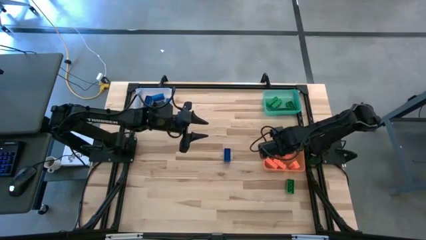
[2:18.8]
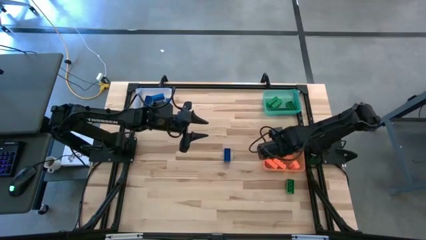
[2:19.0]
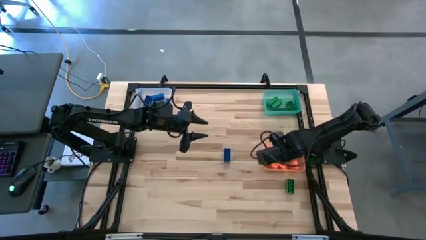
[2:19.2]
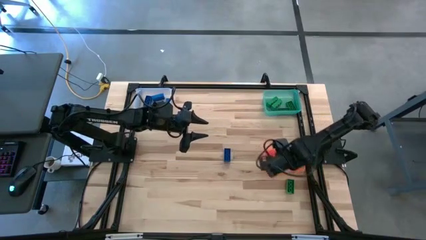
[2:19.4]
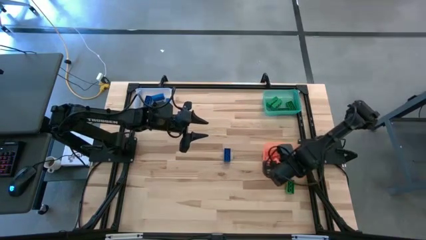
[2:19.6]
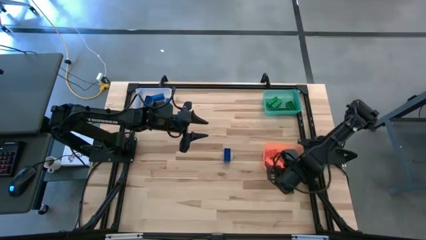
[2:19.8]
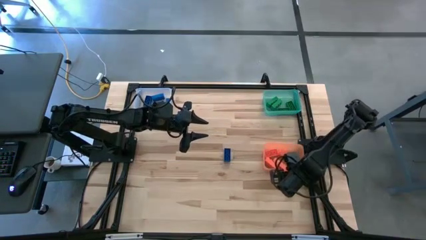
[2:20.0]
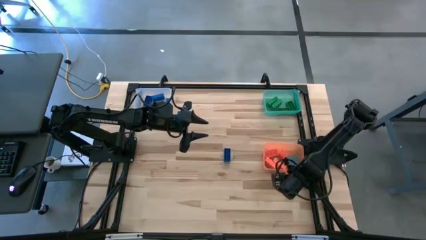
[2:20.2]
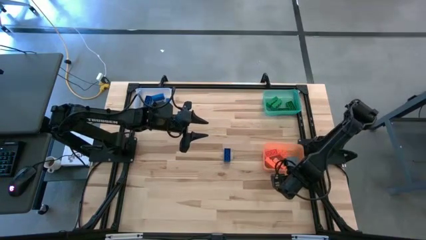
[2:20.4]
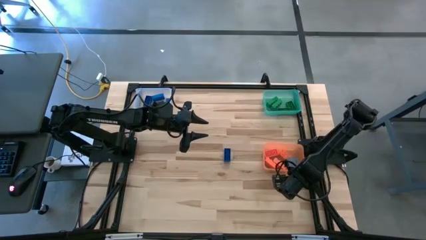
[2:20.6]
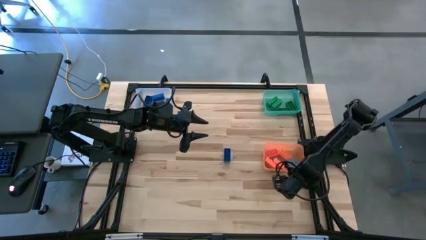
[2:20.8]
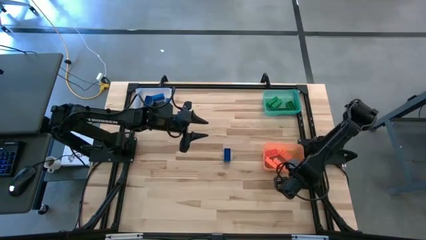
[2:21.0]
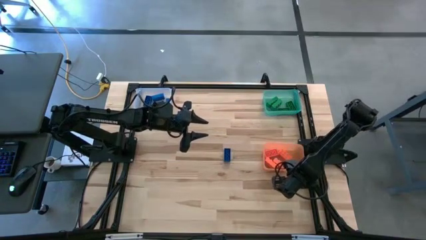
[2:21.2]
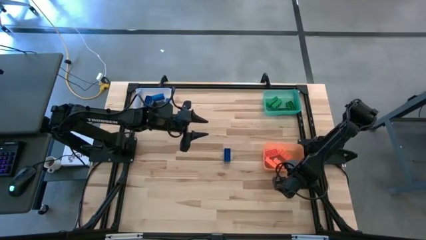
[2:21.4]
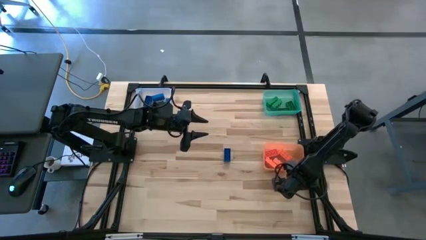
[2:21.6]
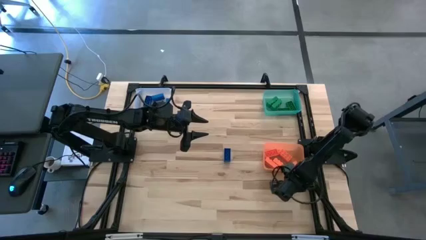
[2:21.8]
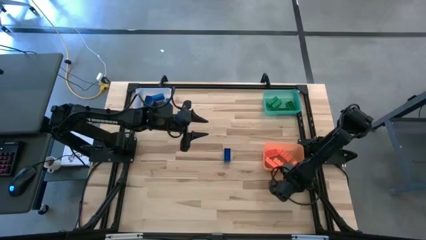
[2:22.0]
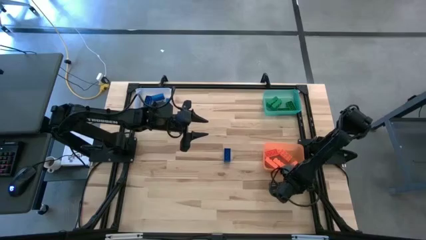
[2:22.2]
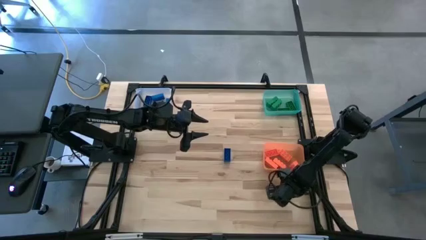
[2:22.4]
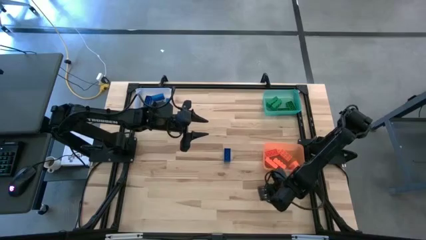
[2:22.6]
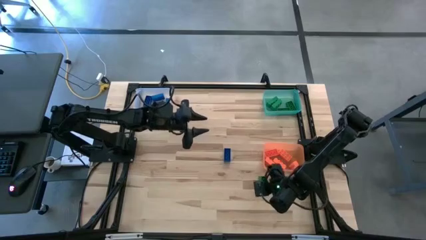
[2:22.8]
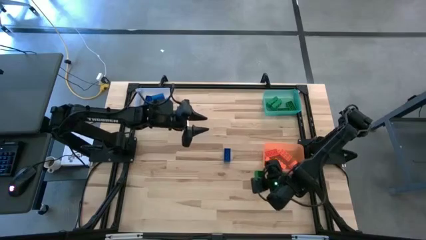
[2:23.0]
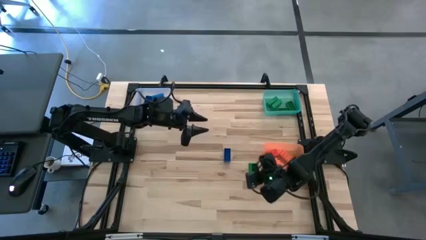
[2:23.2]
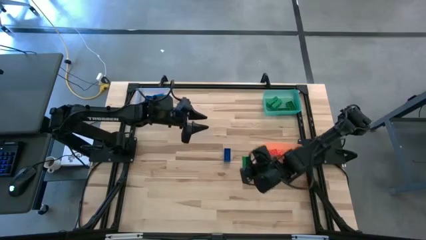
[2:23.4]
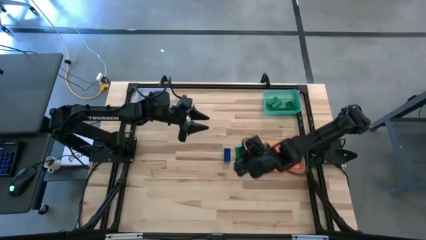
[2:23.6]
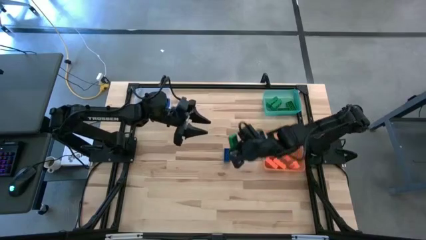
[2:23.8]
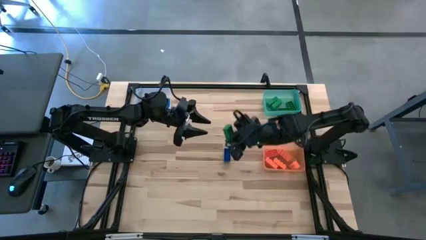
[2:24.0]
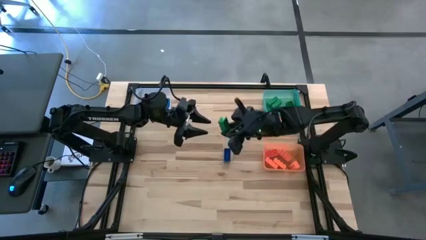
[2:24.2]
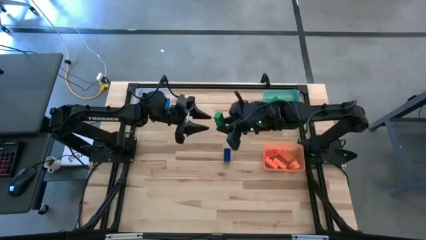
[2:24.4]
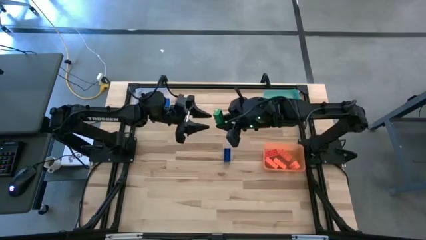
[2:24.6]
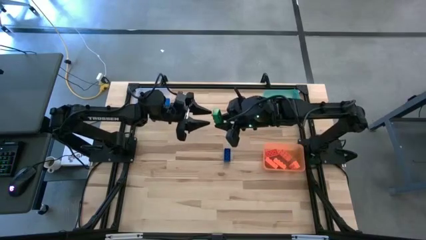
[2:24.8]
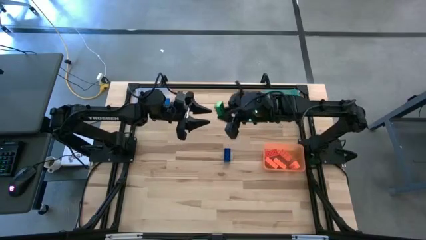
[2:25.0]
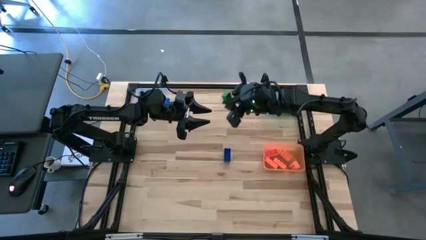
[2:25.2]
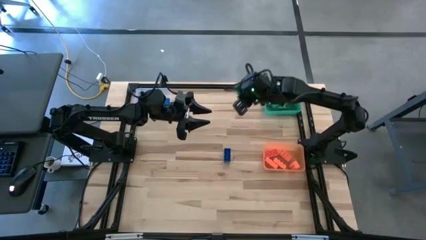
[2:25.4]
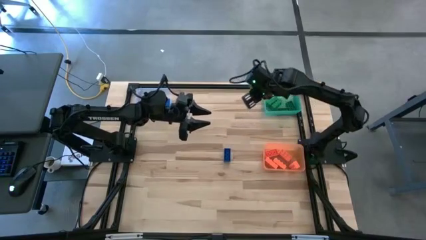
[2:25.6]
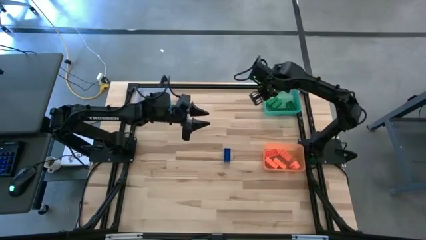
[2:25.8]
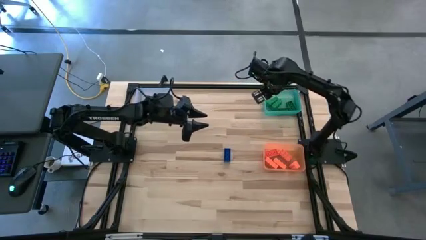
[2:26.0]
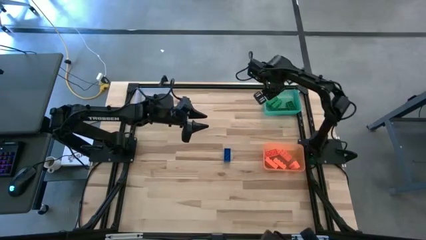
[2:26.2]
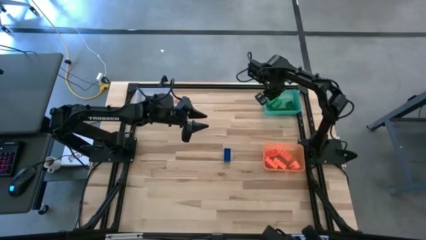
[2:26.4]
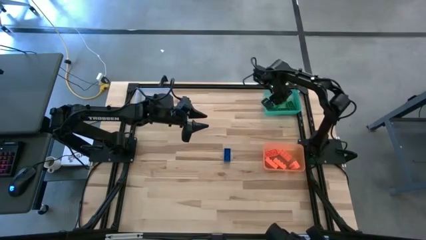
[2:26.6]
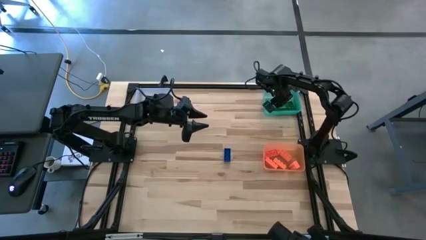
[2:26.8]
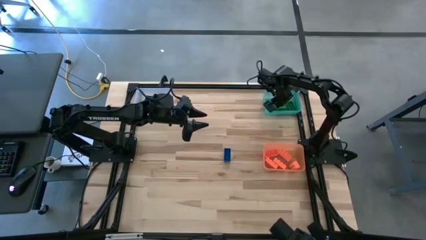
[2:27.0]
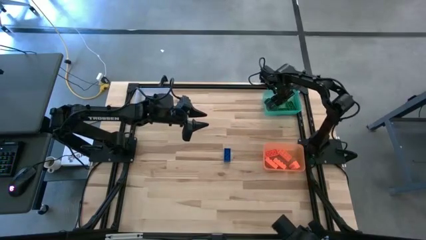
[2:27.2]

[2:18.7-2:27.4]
Task: Sort & place blocks by color
Put the green game piece into the green bin

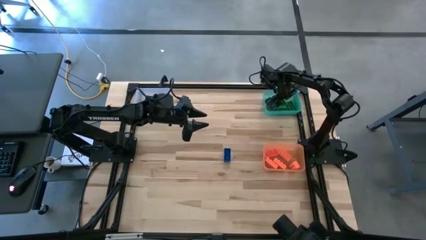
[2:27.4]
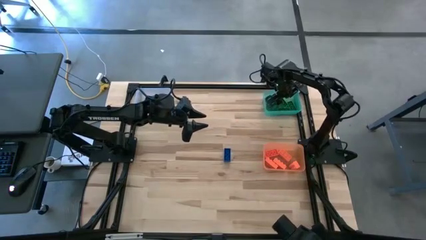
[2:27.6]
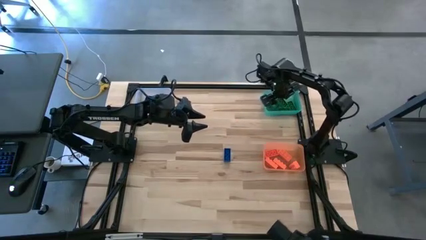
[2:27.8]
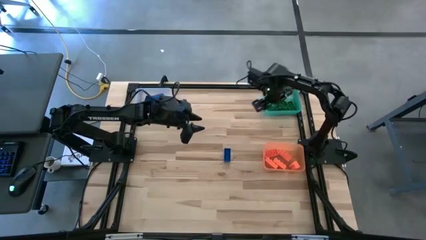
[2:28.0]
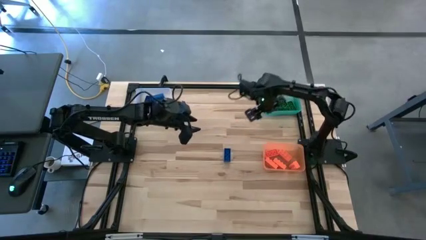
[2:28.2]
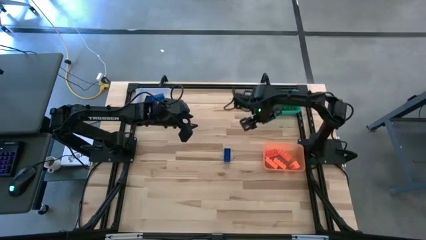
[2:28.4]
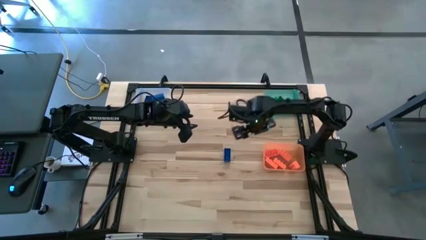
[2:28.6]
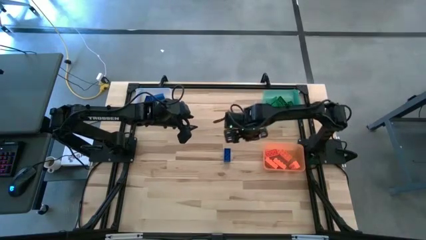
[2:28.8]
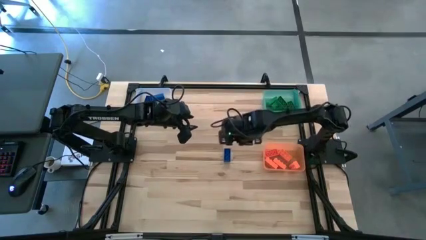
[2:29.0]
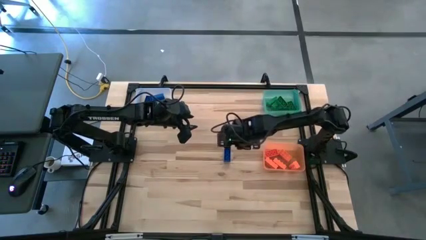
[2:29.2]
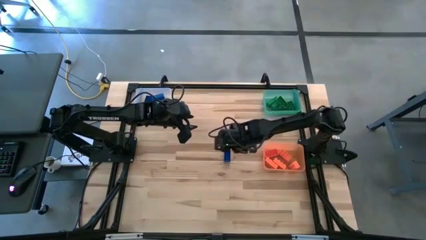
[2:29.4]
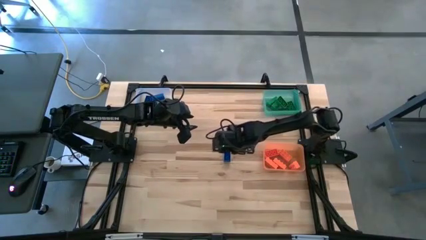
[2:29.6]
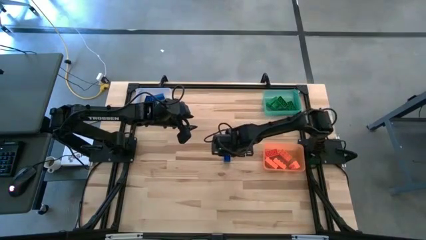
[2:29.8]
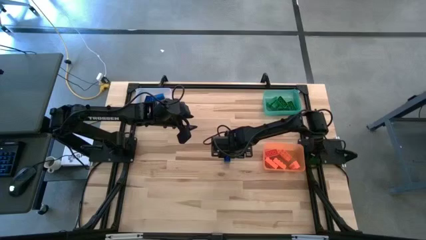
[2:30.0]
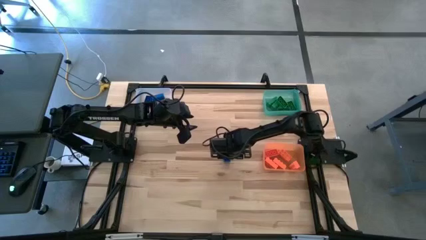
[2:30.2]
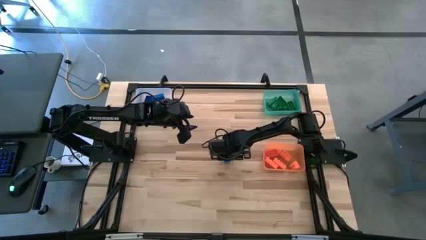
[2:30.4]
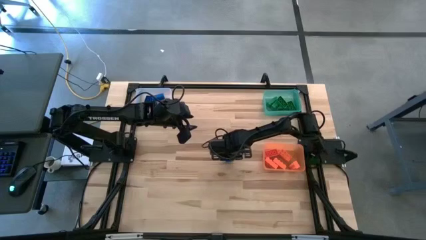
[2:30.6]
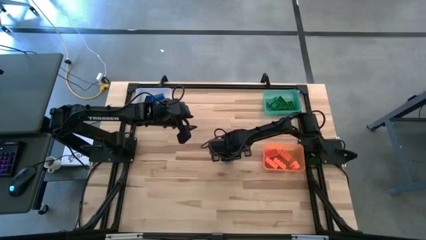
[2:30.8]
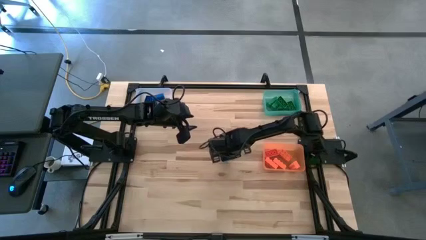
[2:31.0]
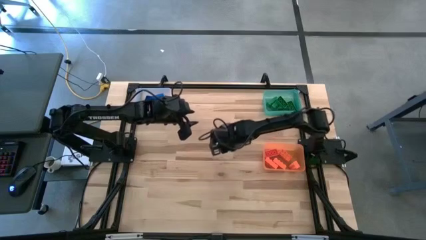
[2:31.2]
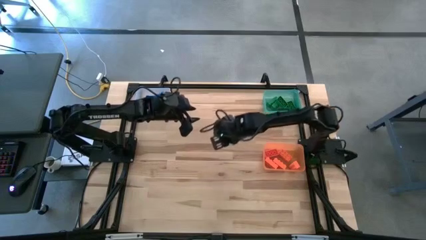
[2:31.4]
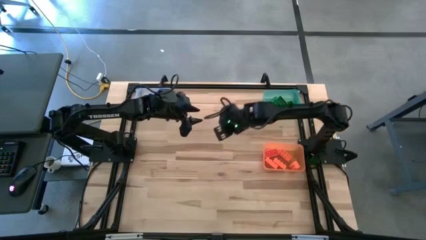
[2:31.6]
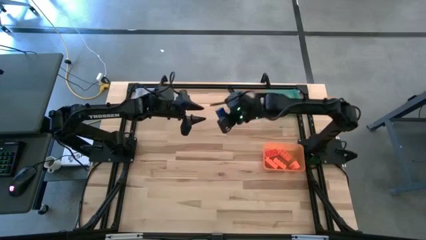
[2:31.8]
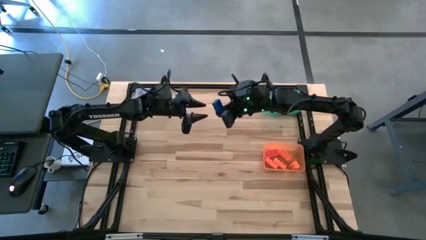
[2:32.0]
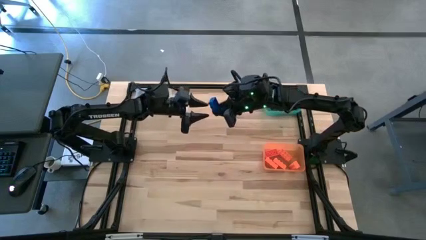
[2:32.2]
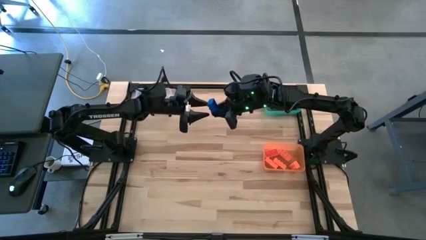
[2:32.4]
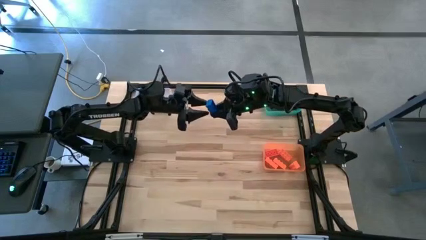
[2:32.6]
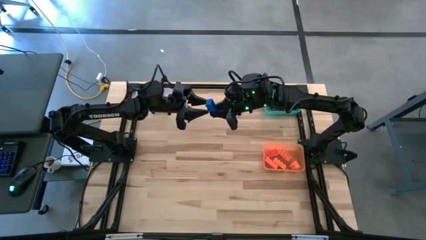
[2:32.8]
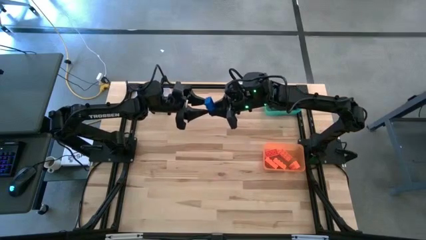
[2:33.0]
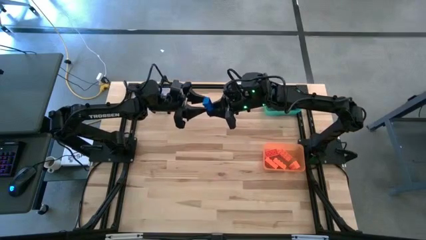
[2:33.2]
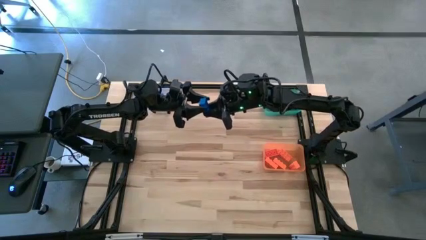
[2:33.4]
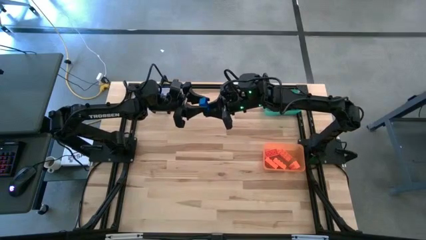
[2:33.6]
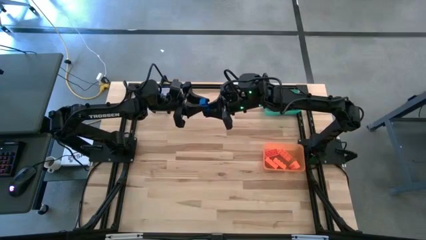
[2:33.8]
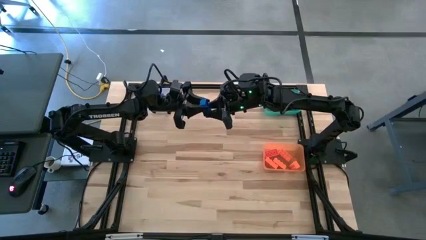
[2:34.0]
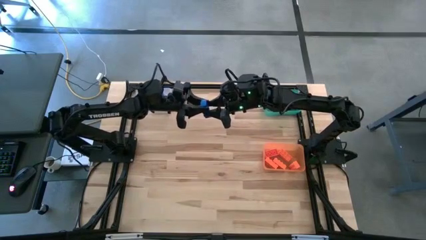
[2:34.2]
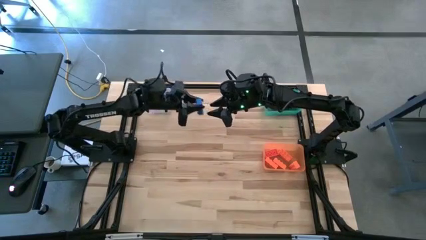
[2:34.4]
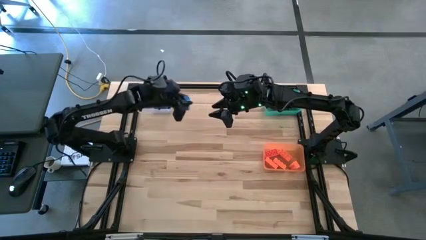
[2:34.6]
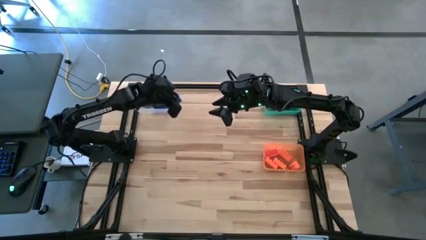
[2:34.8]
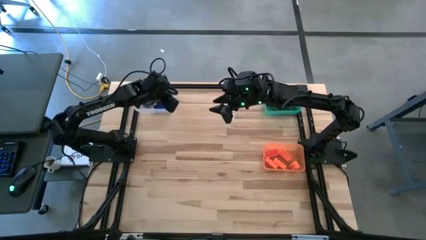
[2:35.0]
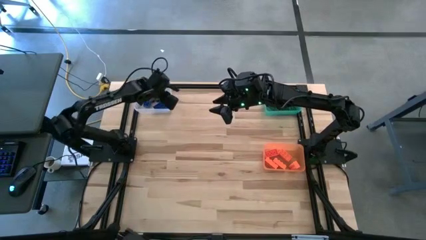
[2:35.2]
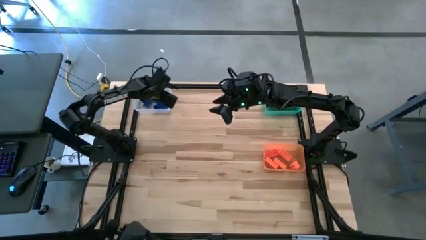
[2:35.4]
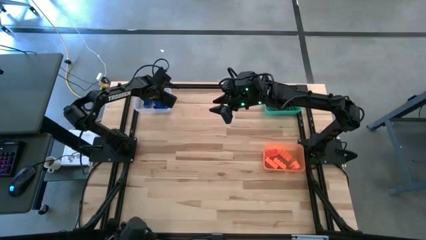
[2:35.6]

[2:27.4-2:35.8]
Put the blue game piece into the transparent bin
